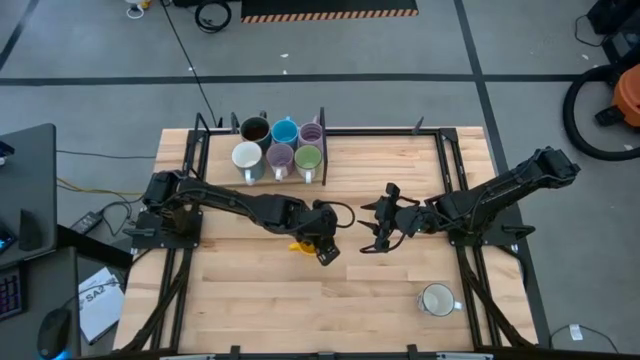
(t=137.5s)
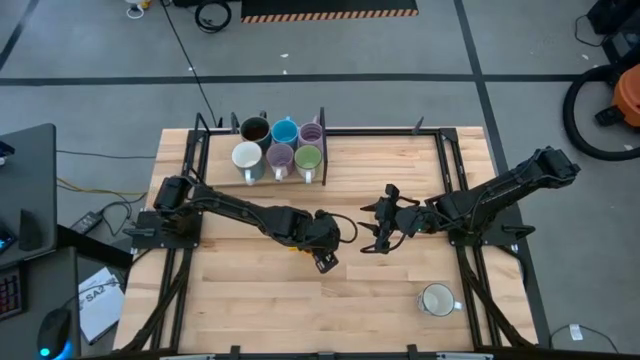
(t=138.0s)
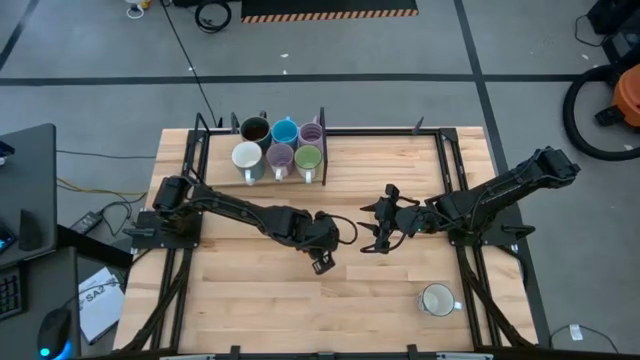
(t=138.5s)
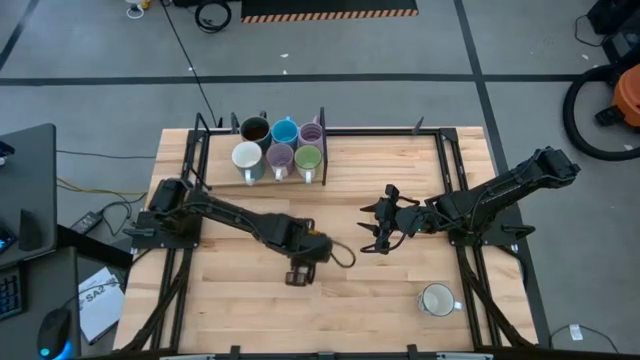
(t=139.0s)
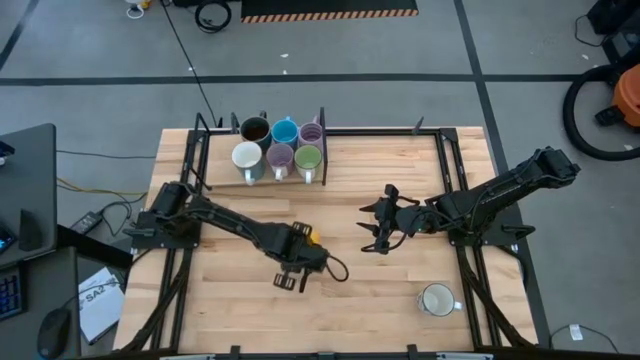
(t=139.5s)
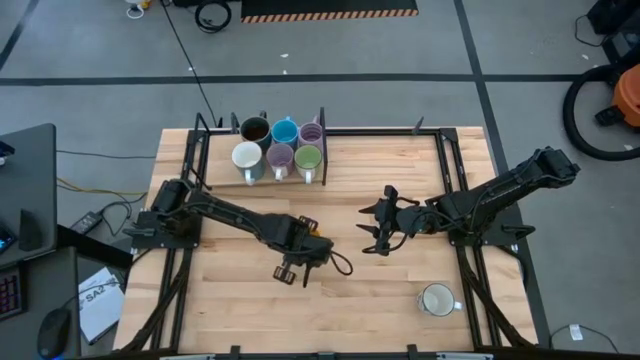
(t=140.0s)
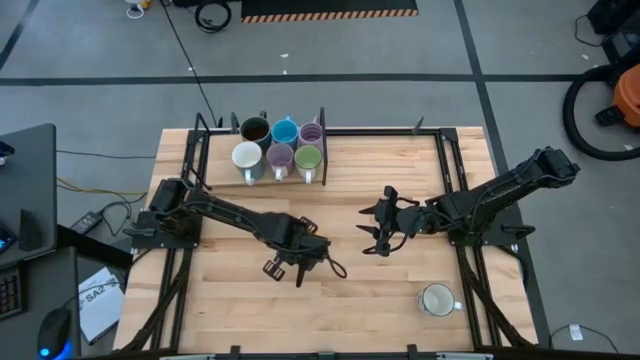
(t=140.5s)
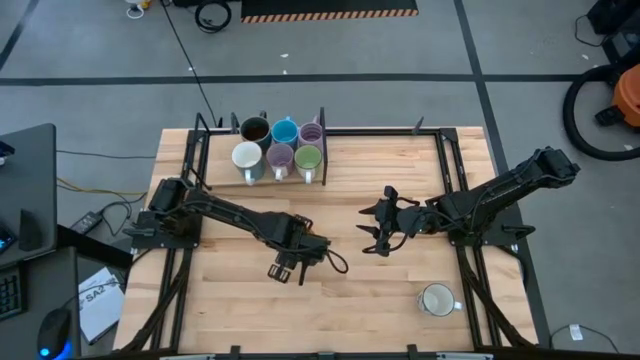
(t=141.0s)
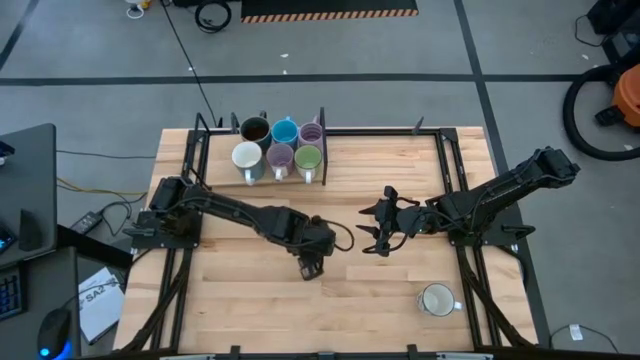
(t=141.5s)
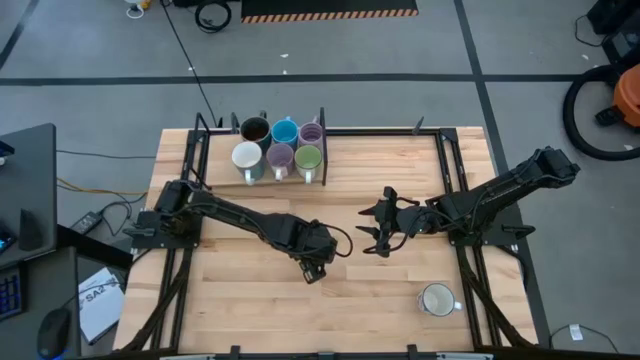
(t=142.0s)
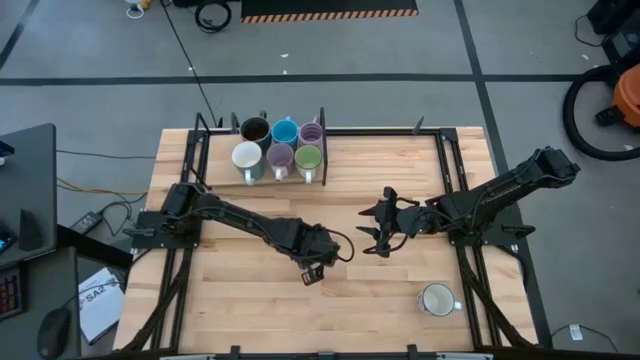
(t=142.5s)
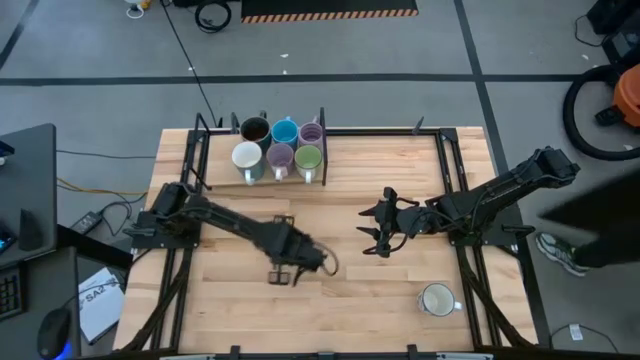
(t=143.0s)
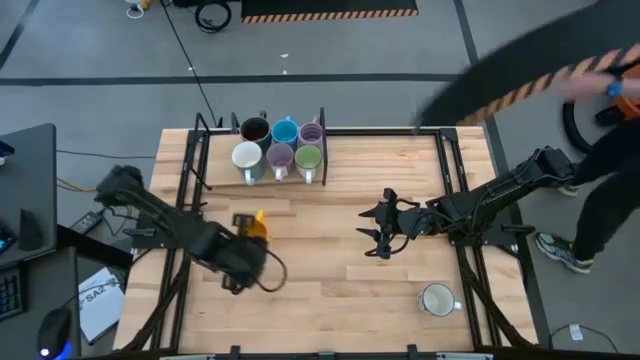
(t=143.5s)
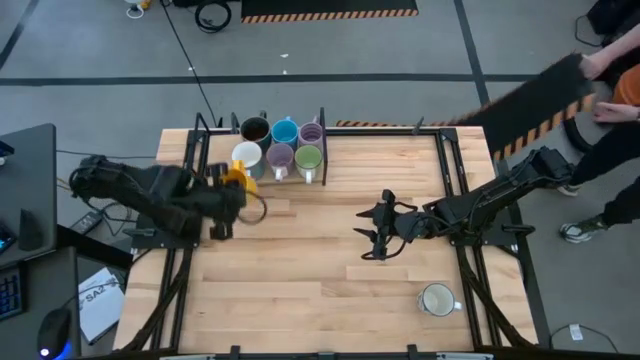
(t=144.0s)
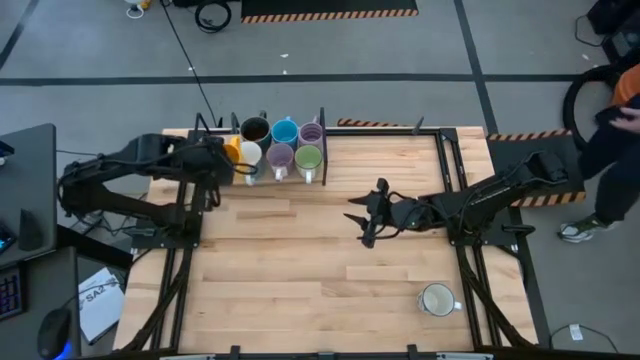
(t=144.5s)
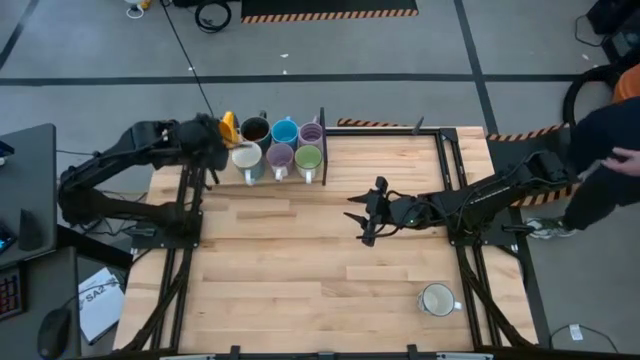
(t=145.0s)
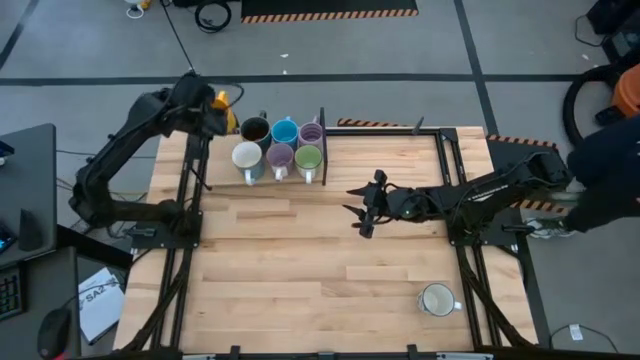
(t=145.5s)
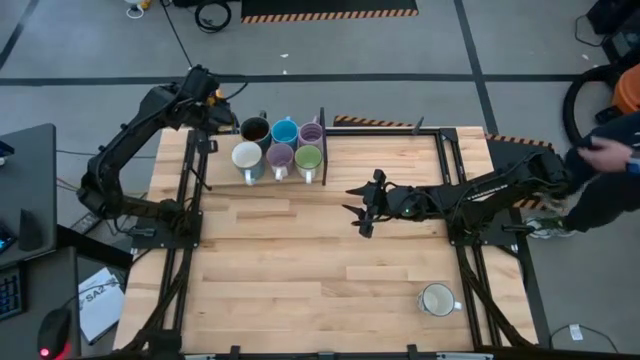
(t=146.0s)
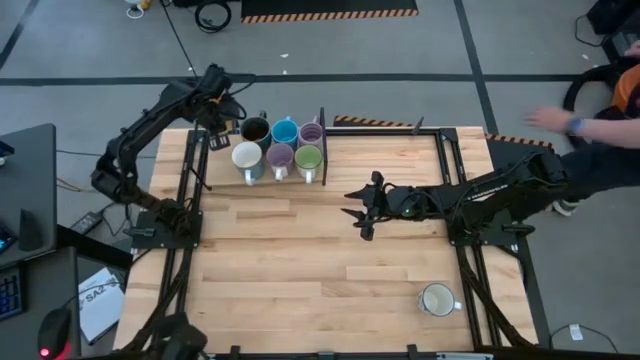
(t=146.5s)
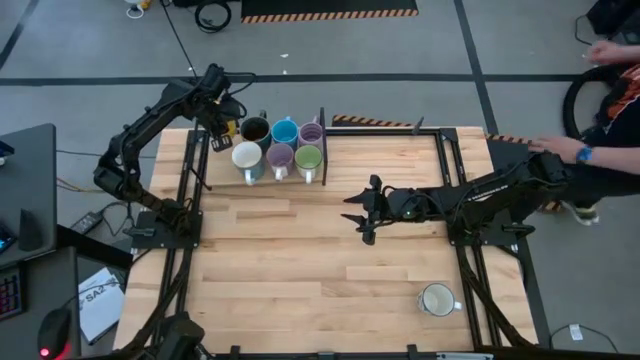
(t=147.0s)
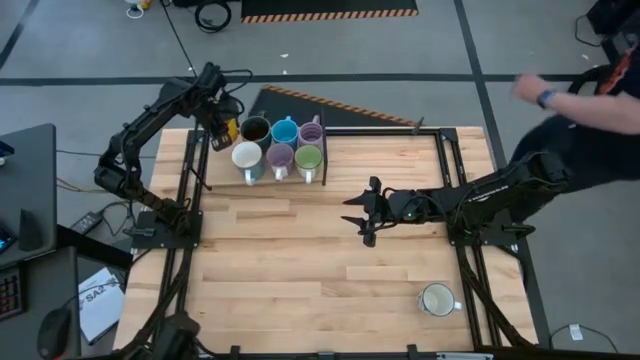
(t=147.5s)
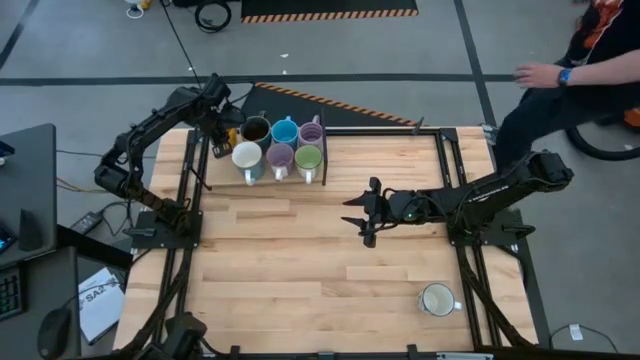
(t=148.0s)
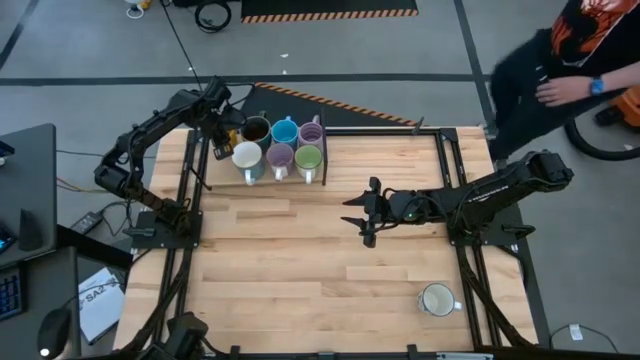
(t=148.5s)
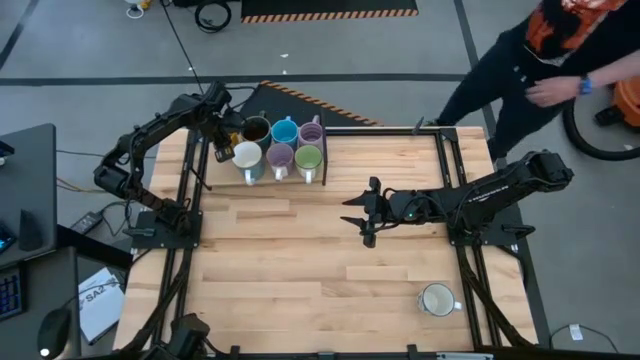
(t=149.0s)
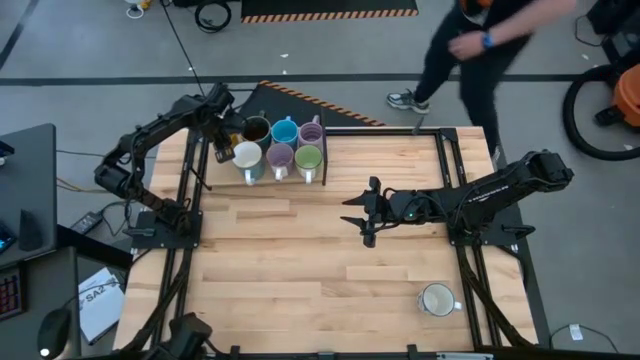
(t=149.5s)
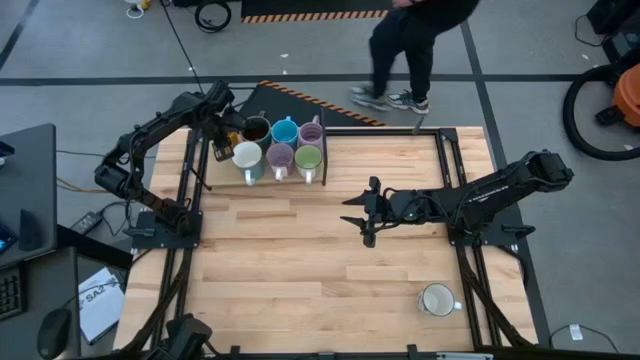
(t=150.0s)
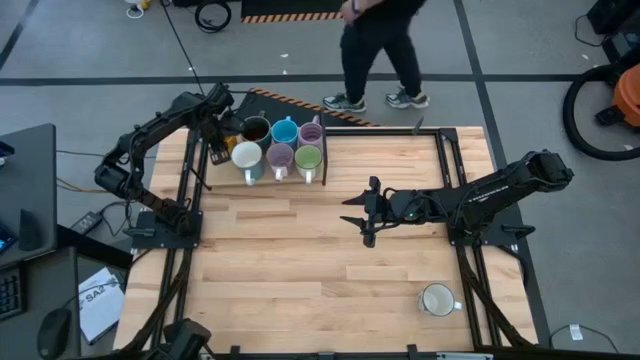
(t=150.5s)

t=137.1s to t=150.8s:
Task: Place coffee mugs
Put the yellow mug on the shelf

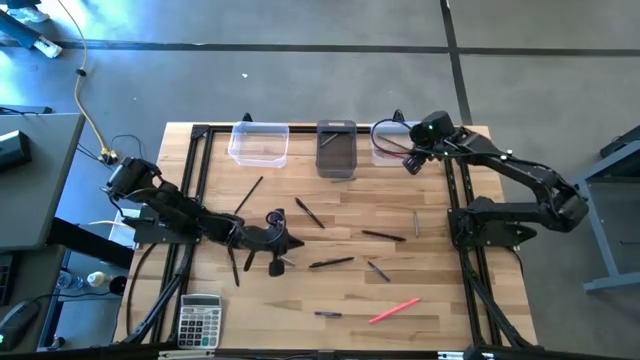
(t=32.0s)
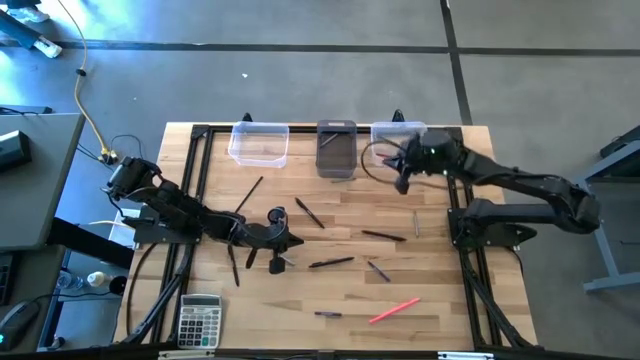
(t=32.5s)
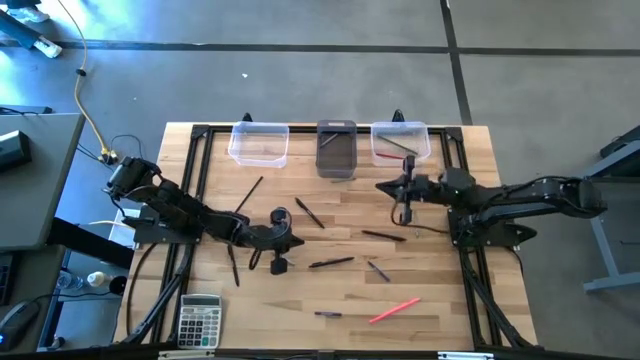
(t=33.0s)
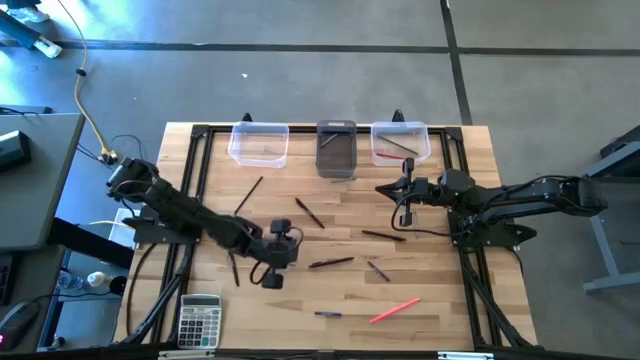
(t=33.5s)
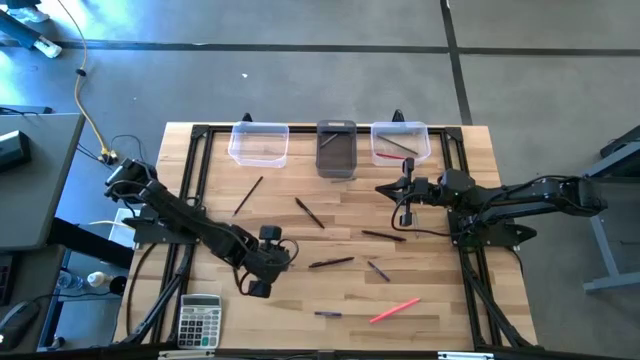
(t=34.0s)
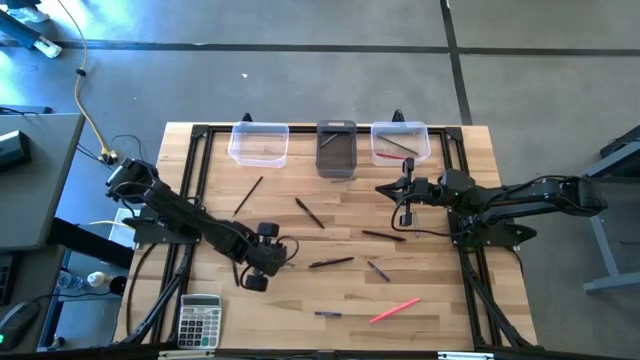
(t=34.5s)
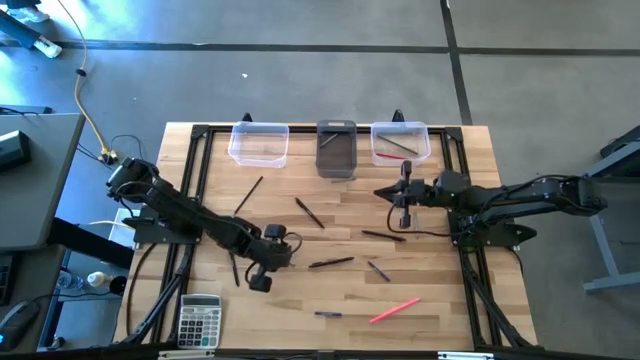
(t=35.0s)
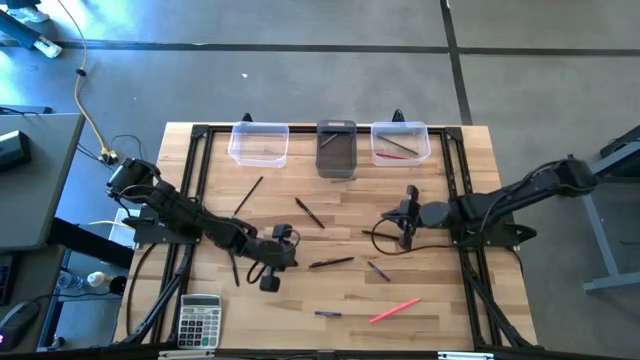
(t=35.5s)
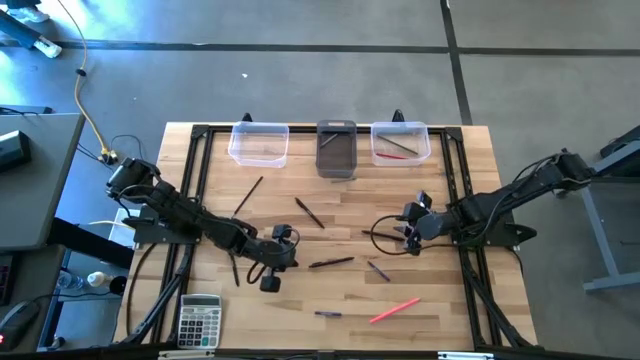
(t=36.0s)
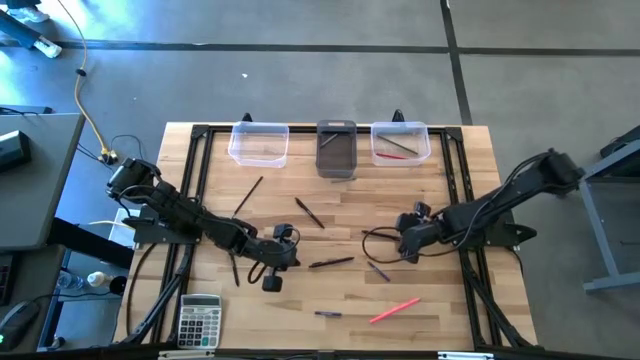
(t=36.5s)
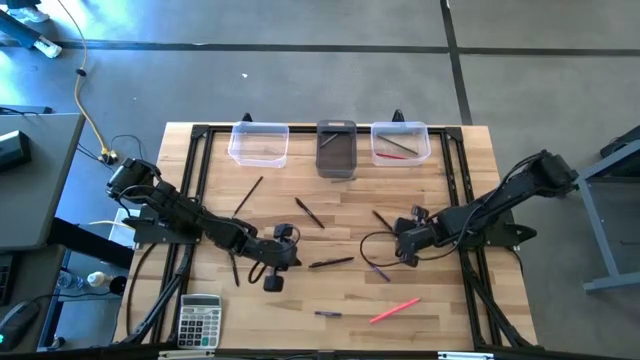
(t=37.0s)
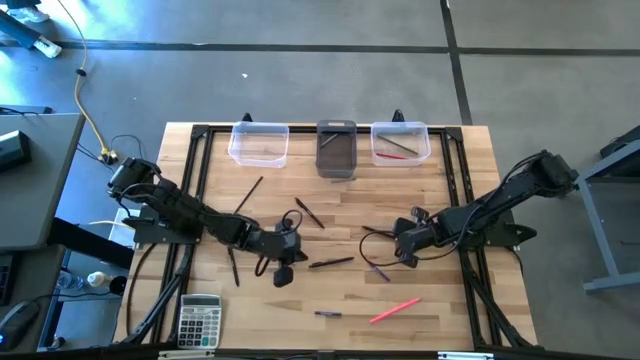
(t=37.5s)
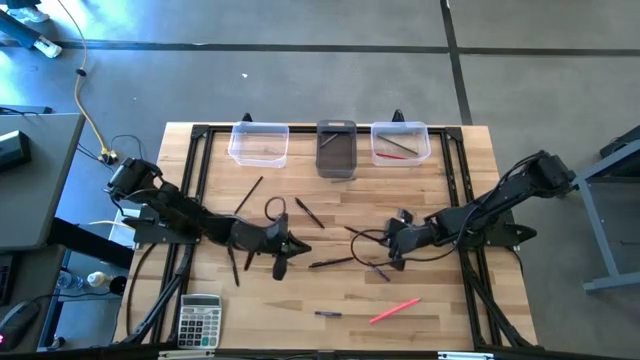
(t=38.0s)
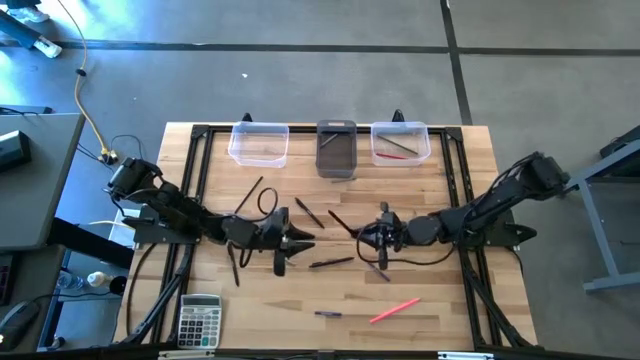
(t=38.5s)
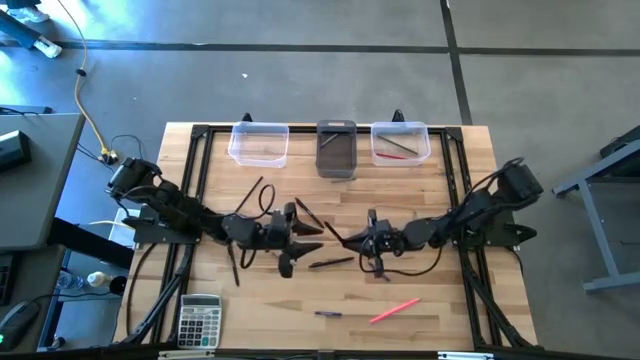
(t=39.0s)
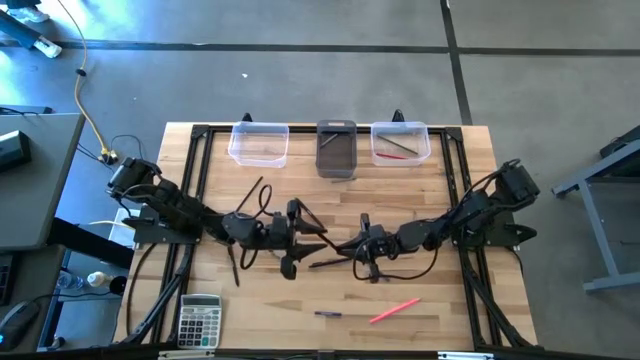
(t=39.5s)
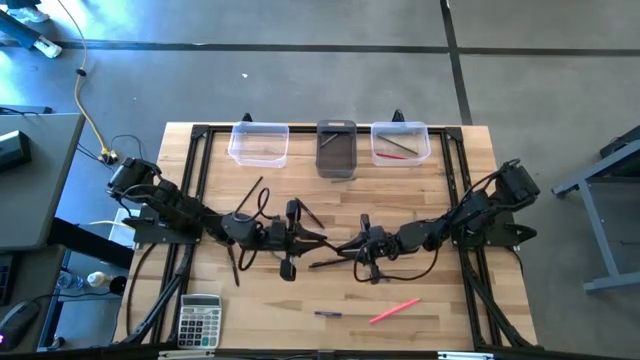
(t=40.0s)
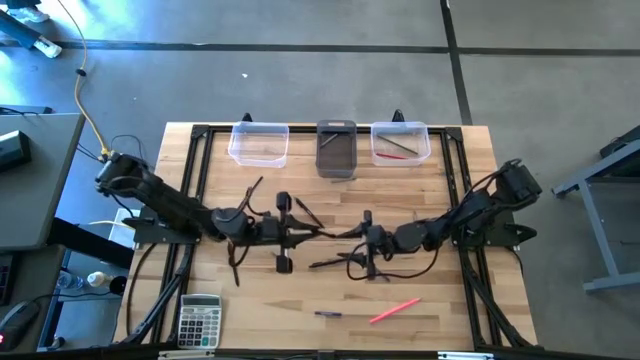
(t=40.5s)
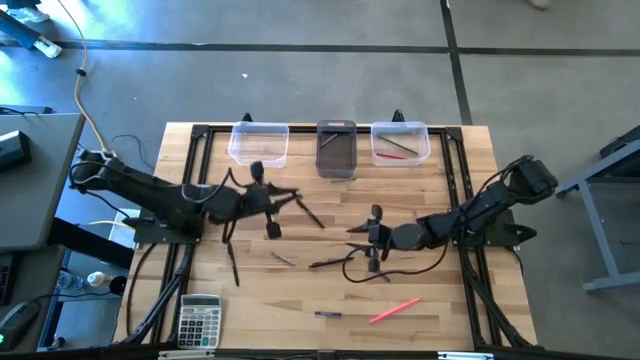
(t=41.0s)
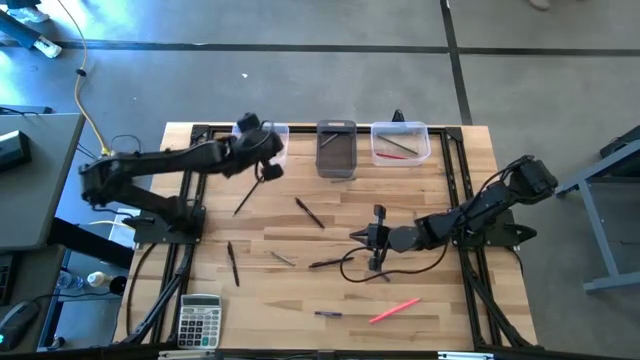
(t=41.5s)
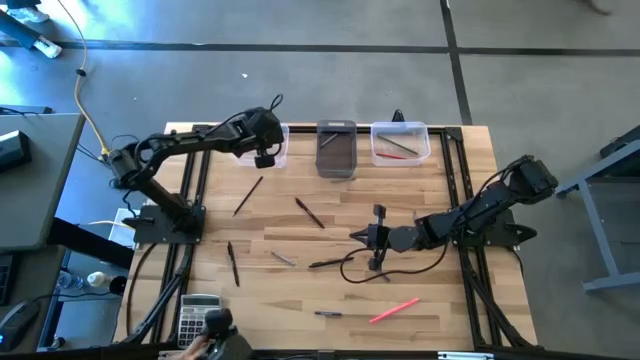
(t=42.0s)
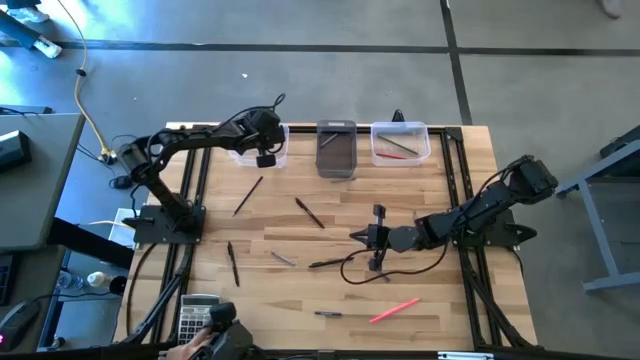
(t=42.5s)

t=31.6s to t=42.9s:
Task: Sort crayons/erasers/pens/pencils in bins
Put the black pen into the left transparent bin
